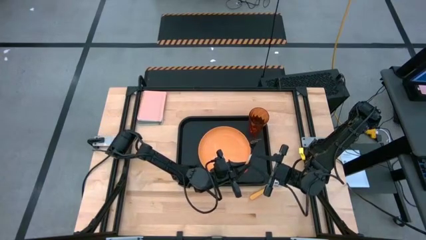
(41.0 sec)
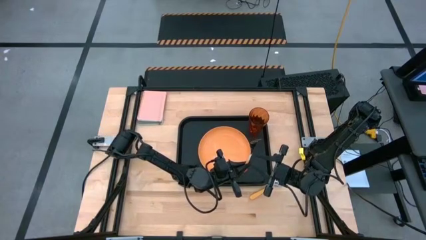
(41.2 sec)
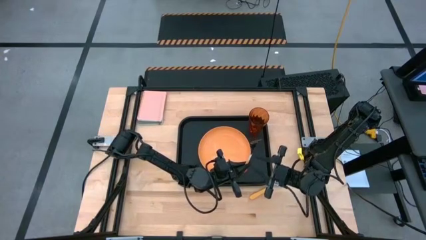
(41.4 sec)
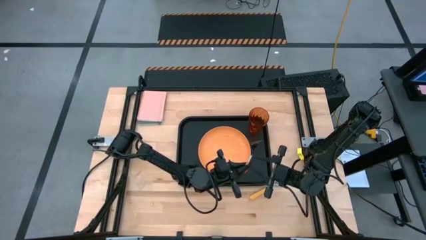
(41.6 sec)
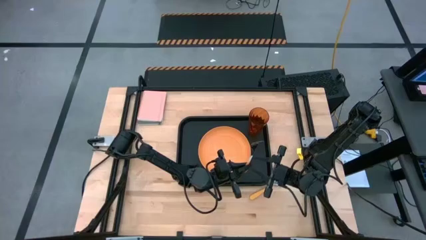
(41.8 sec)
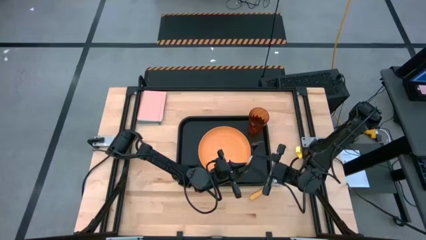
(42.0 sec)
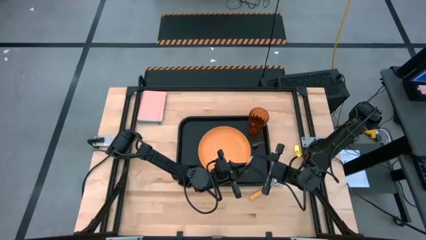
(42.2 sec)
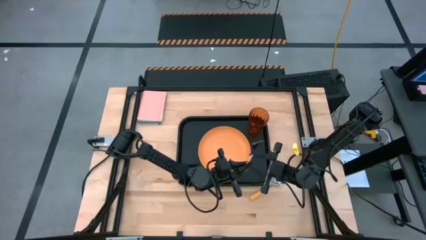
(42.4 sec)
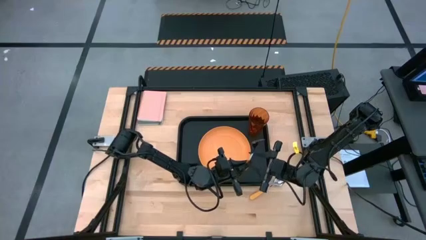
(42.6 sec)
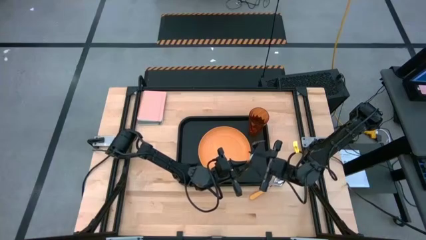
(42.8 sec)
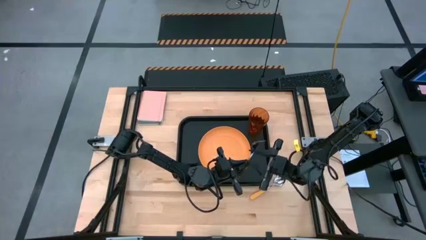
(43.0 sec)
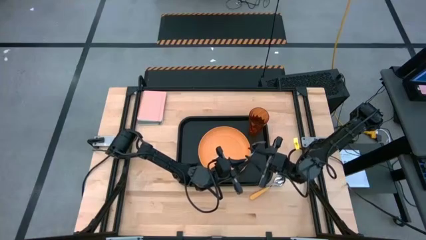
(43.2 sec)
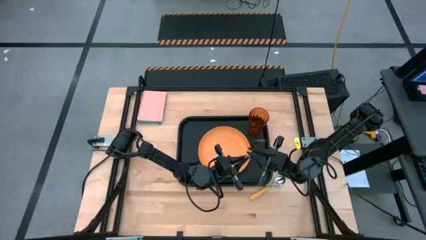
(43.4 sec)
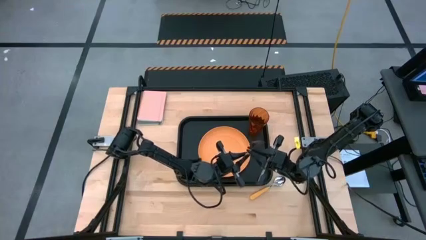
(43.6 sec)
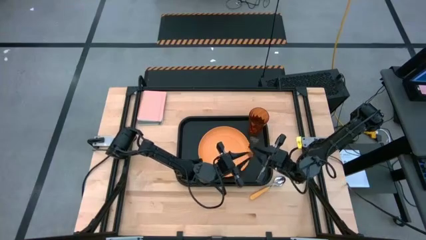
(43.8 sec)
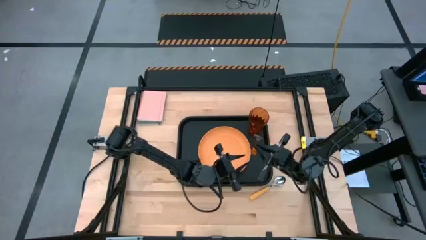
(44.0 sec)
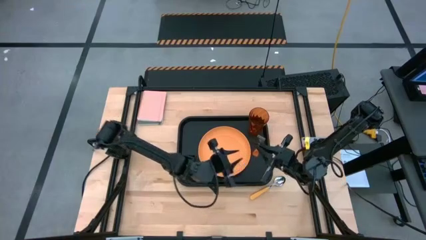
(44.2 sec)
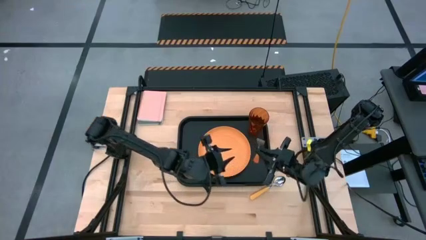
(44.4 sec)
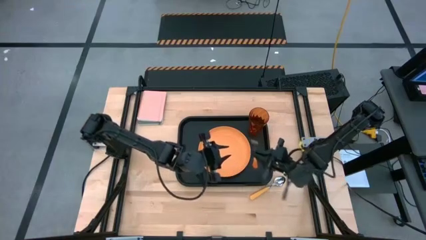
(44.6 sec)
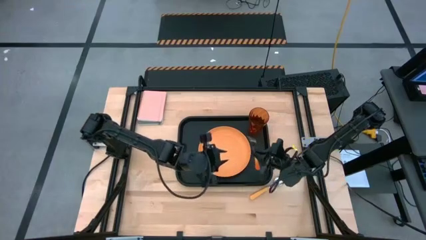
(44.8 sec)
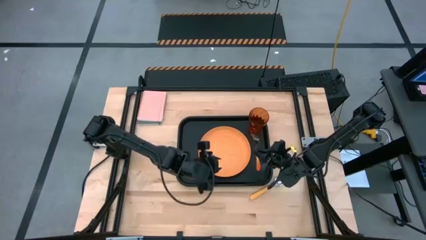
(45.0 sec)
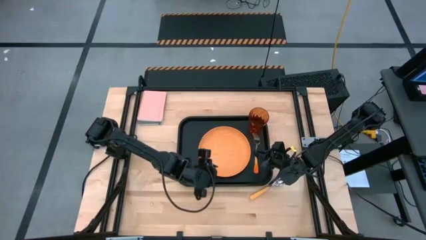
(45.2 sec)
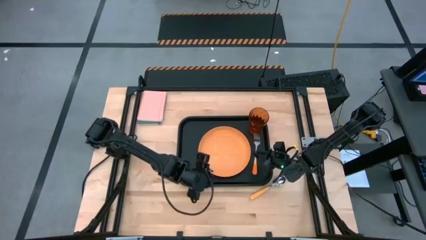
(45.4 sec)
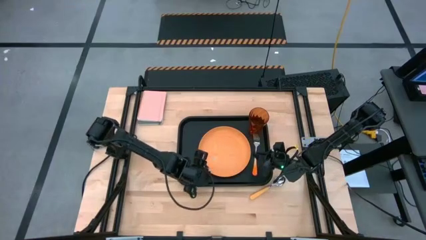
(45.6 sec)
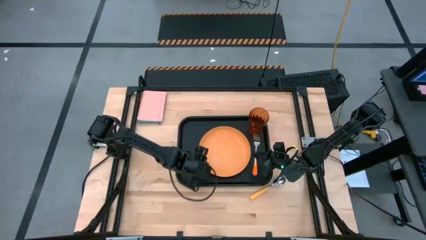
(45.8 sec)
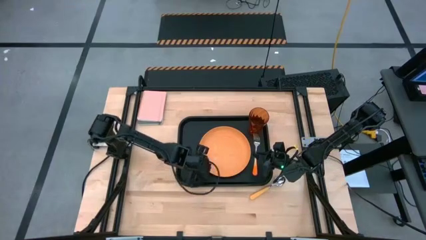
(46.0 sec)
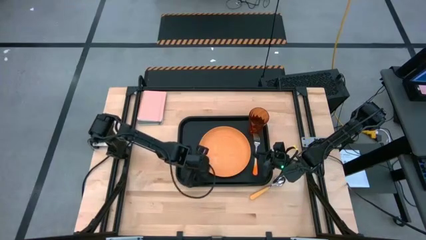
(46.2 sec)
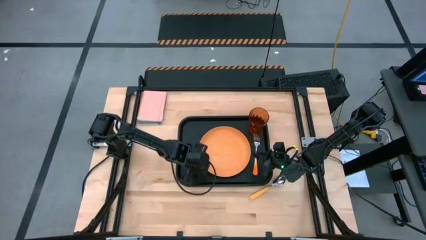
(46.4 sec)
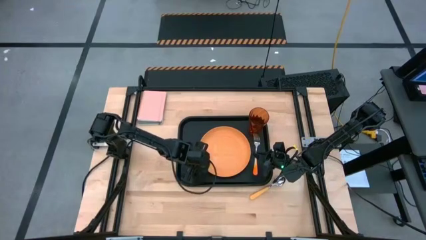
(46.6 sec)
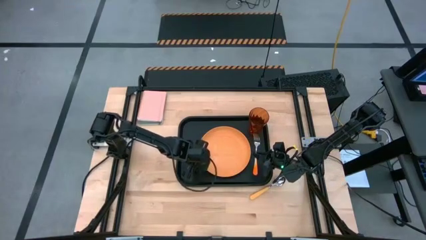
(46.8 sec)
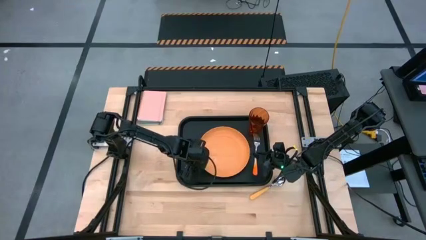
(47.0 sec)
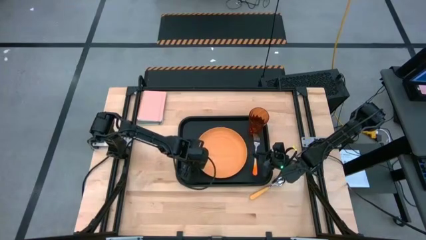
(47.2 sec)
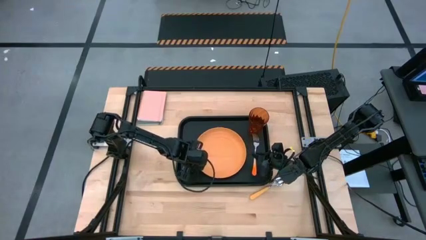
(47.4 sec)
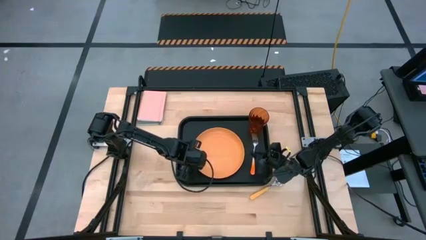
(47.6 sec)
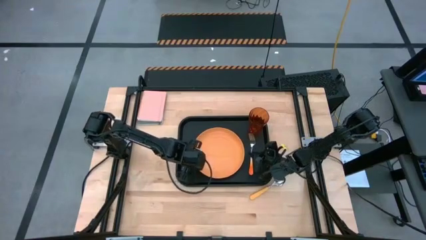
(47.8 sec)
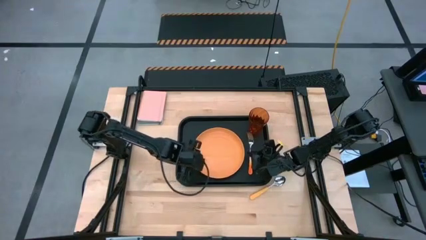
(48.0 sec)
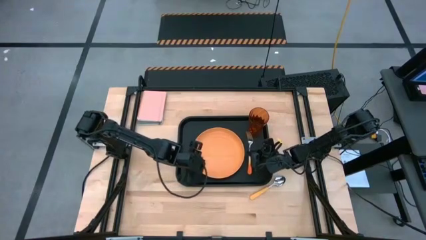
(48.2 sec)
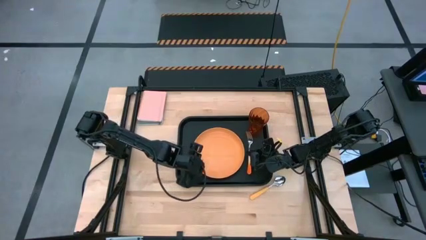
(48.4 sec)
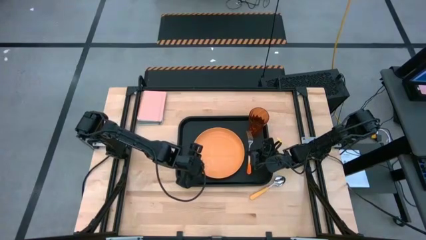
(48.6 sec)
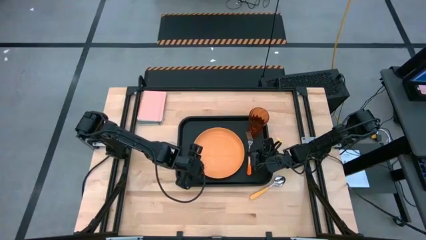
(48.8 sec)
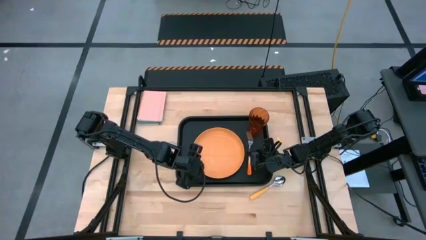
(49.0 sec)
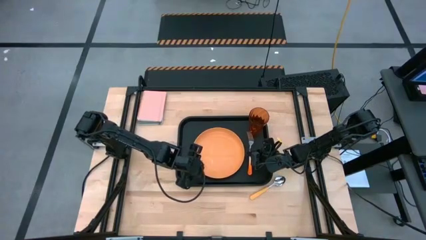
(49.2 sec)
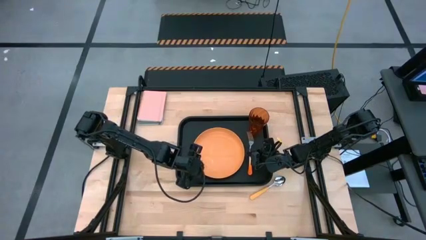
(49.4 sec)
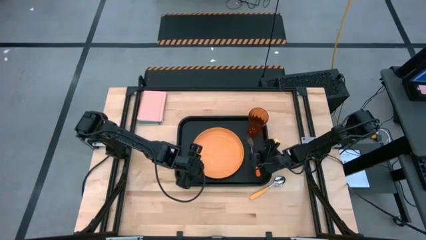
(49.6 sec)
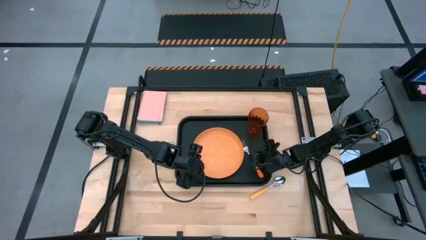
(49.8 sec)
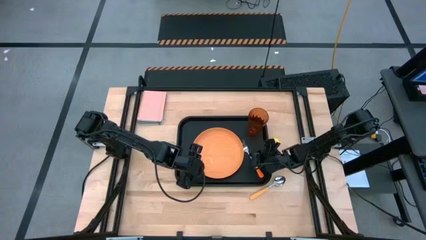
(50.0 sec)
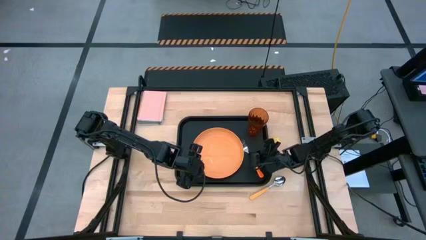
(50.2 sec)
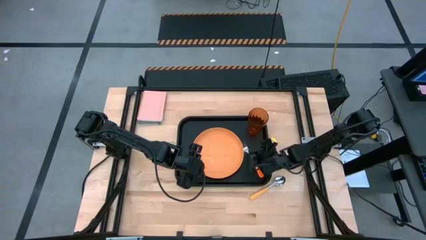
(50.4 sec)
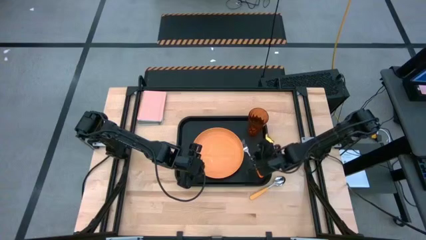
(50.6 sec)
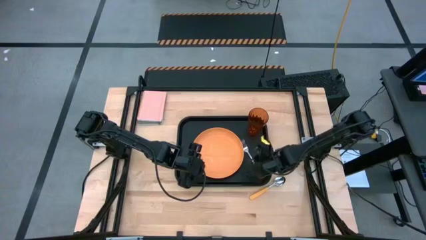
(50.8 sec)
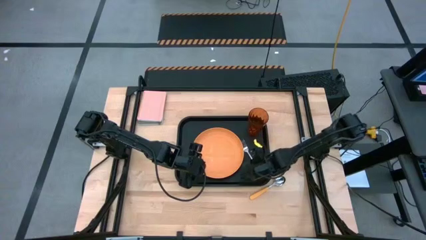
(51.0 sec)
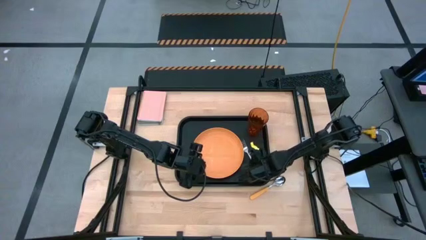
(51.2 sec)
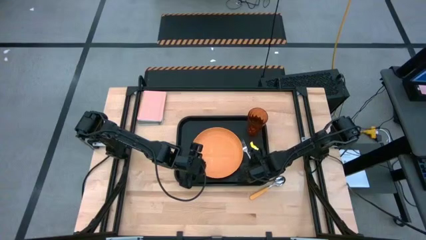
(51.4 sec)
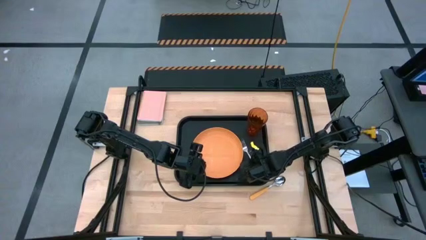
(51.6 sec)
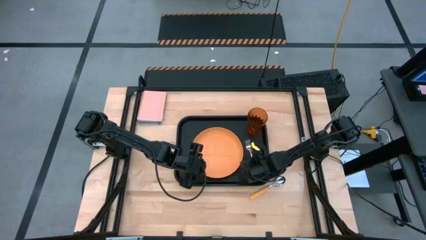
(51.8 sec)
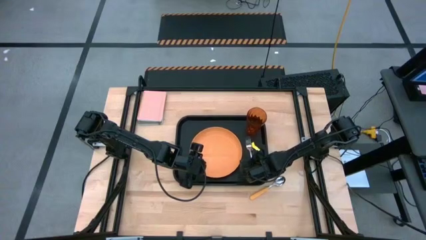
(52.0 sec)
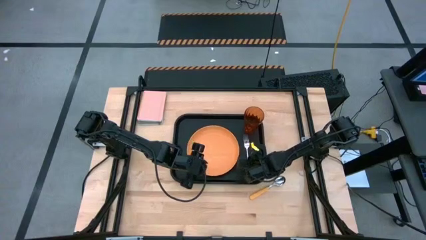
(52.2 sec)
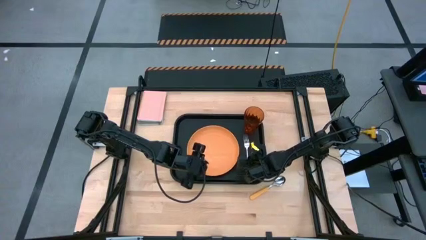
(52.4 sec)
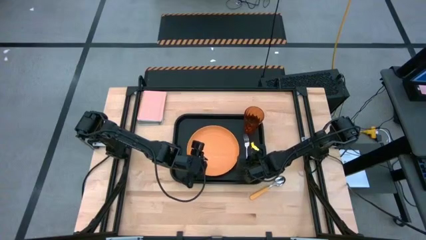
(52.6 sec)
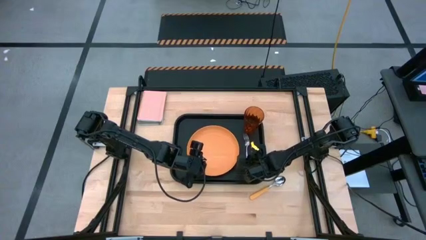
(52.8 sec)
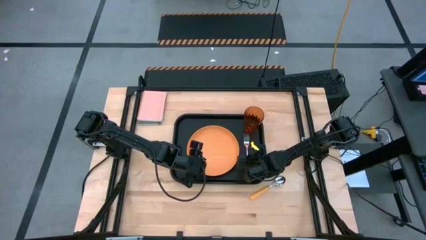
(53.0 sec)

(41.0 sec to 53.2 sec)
Task: Pick and place plate/cup/fork/spoon on tray
Put the orange fork on the black tray to the right of the orange plate

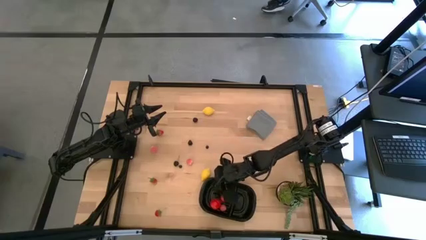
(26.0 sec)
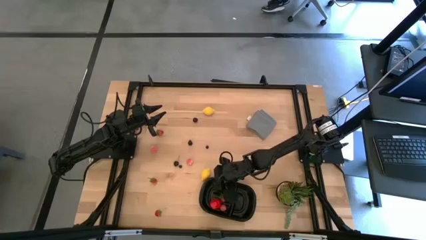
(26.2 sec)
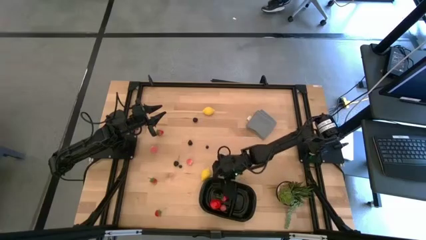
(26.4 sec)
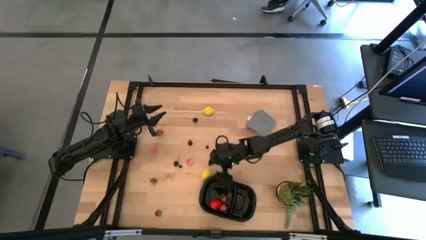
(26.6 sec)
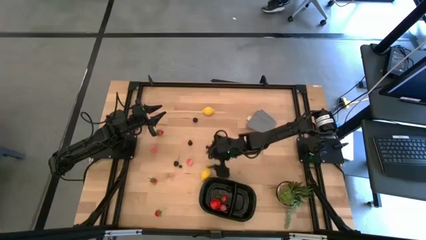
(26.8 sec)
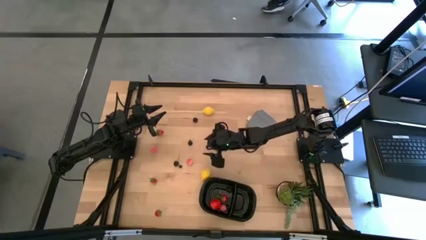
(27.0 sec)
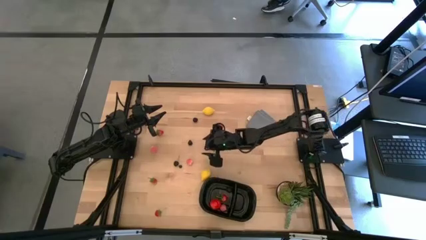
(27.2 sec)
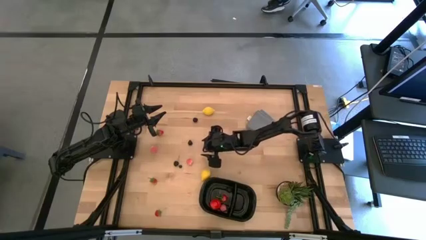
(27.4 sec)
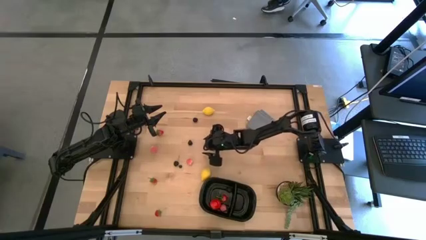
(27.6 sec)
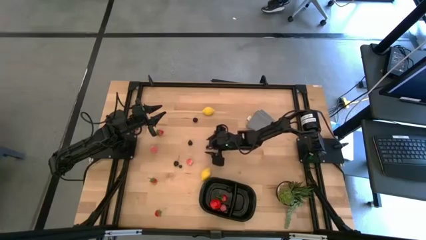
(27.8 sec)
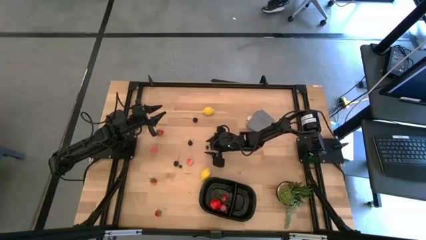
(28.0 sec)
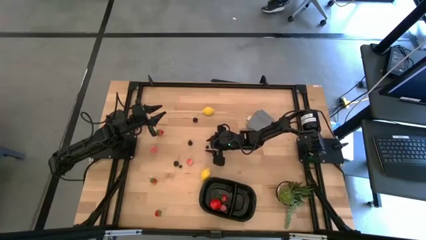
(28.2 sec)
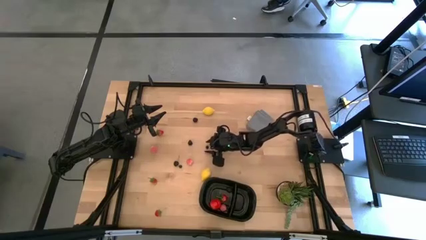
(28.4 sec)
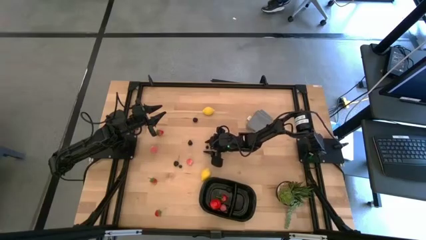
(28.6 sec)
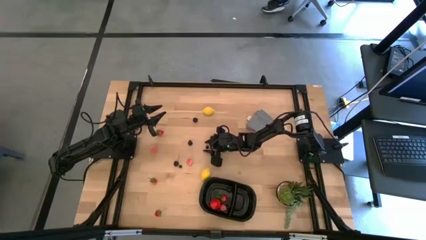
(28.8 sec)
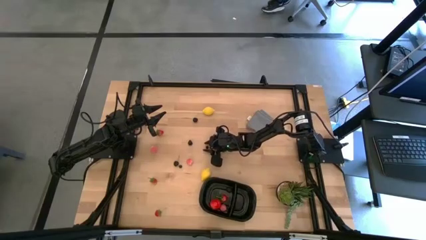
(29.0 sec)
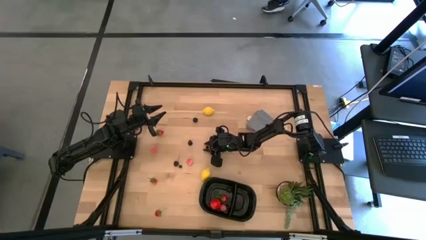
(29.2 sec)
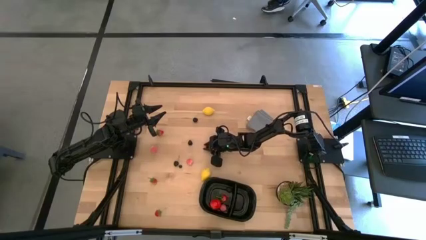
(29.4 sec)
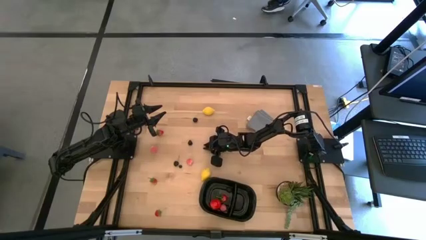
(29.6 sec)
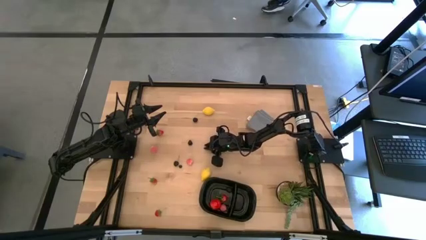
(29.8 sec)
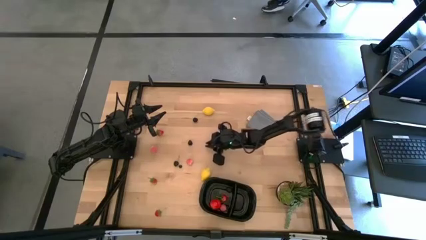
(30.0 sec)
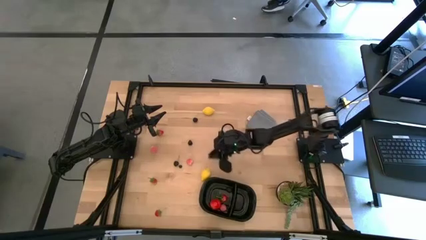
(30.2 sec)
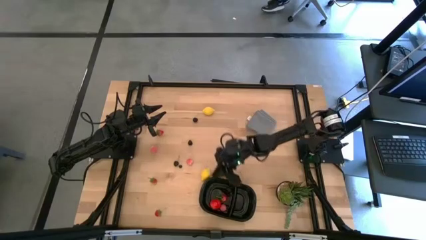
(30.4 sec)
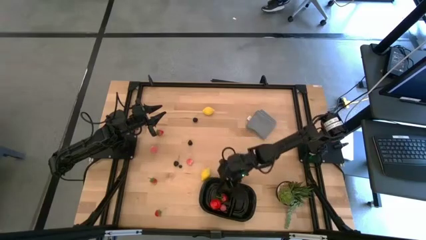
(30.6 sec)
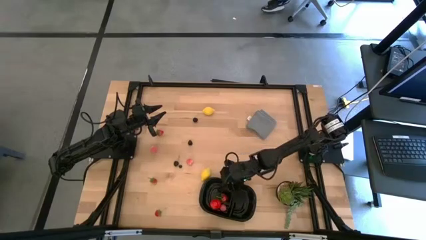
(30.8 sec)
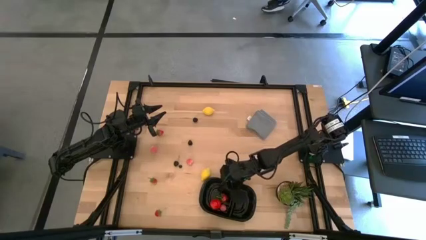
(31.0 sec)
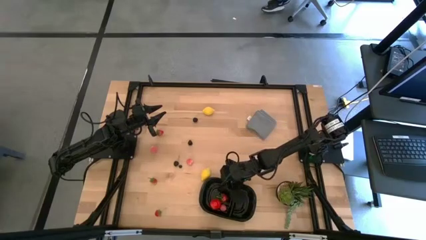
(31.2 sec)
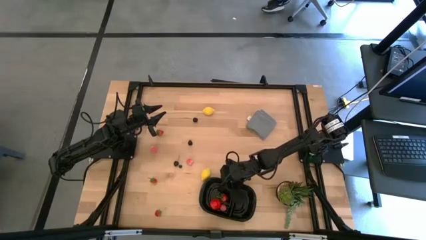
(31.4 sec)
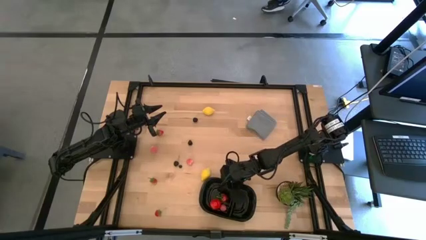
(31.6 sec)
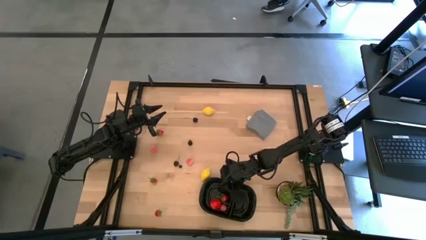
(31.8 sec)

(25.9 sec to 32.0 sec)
Task: Pick and placing Produce into tupperware
Put the blueberry into the black bin
